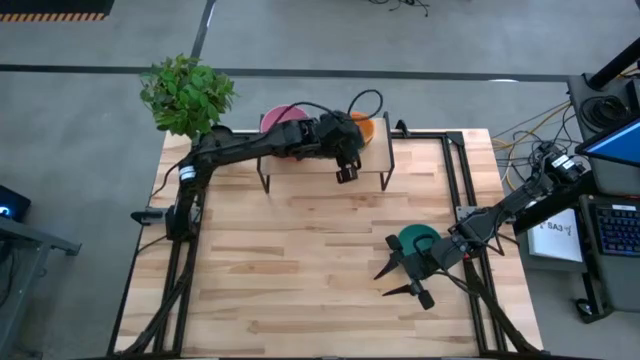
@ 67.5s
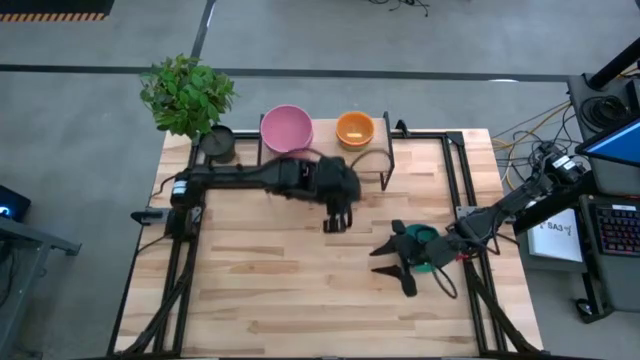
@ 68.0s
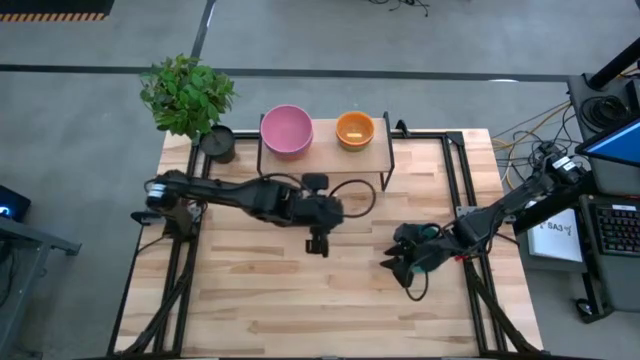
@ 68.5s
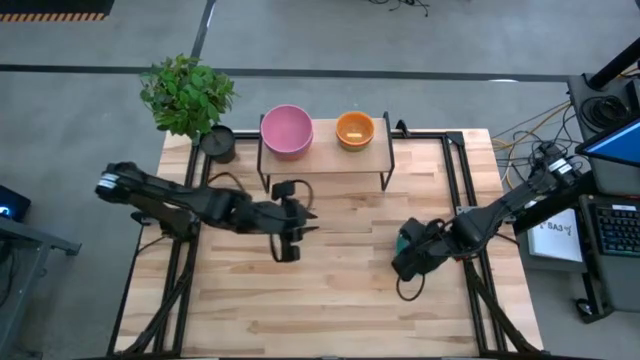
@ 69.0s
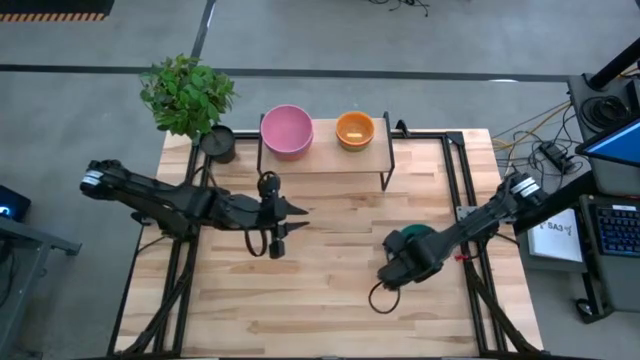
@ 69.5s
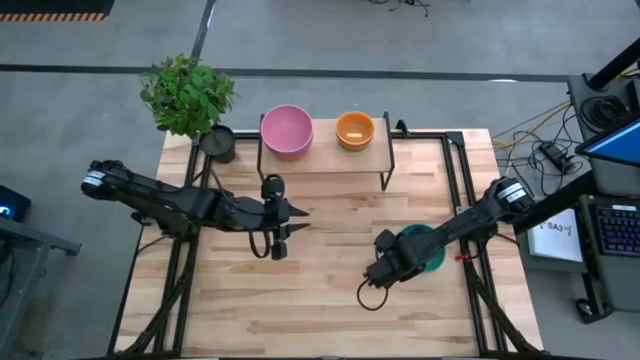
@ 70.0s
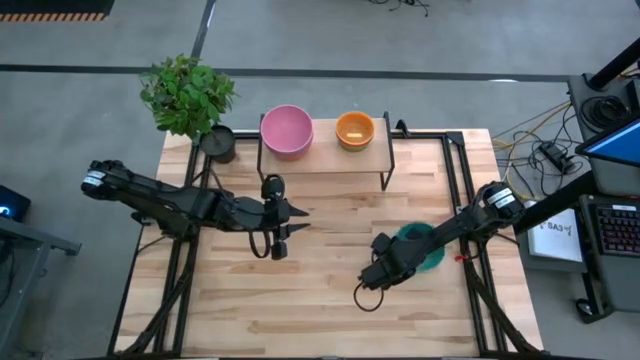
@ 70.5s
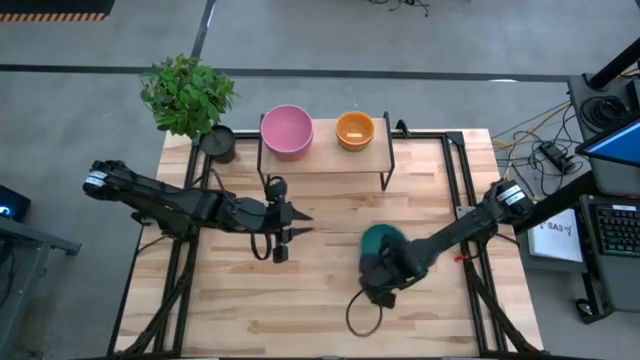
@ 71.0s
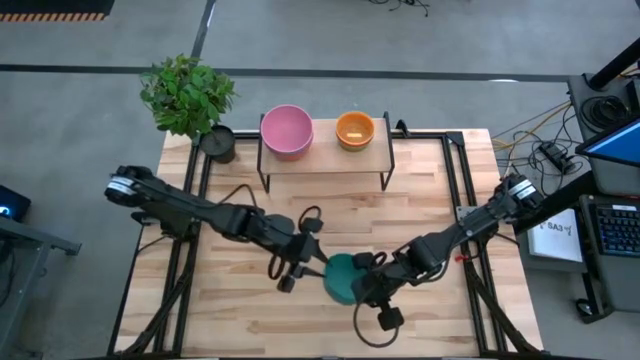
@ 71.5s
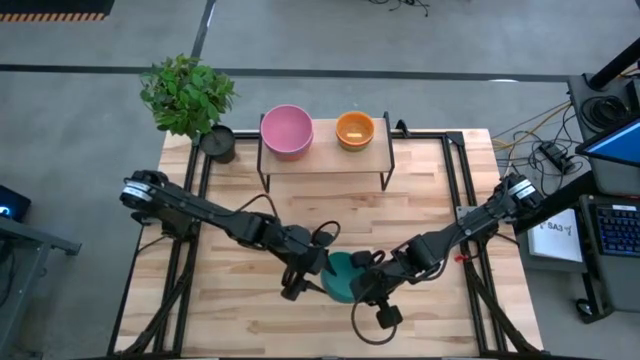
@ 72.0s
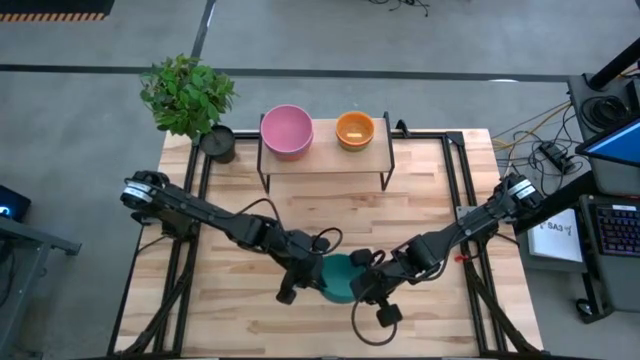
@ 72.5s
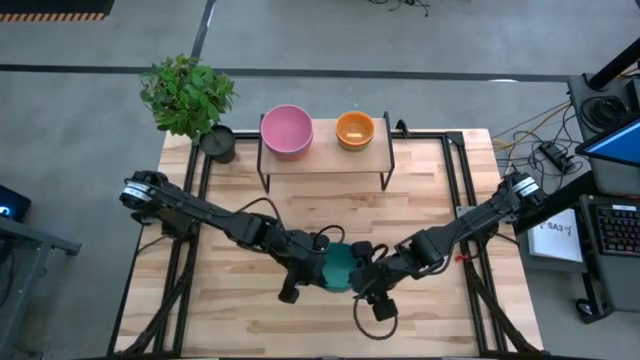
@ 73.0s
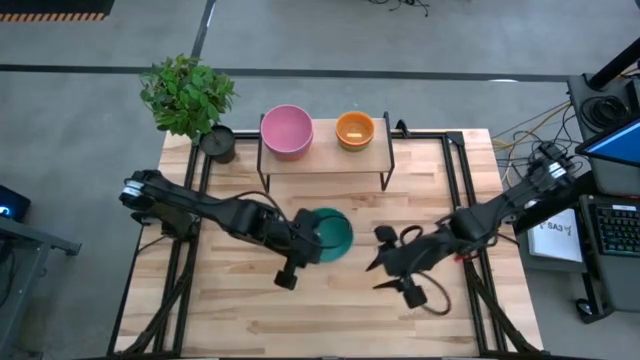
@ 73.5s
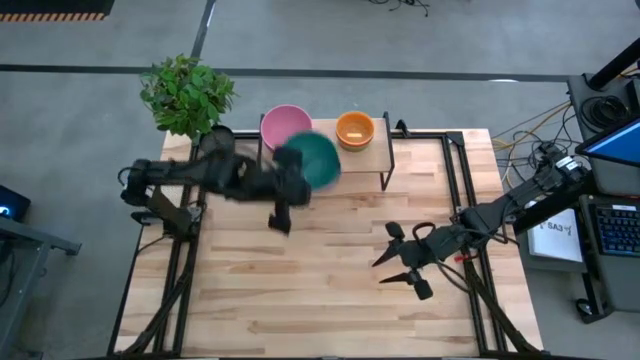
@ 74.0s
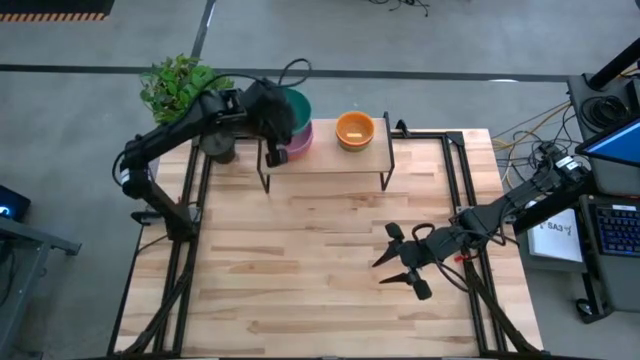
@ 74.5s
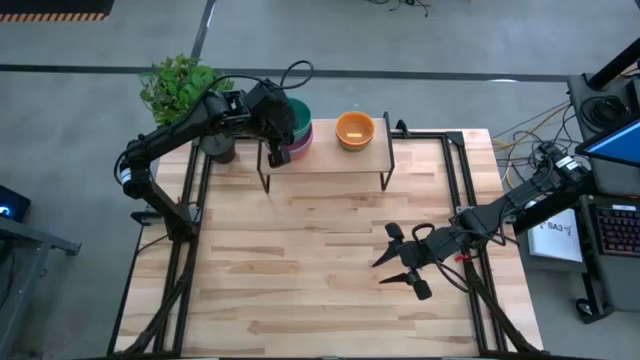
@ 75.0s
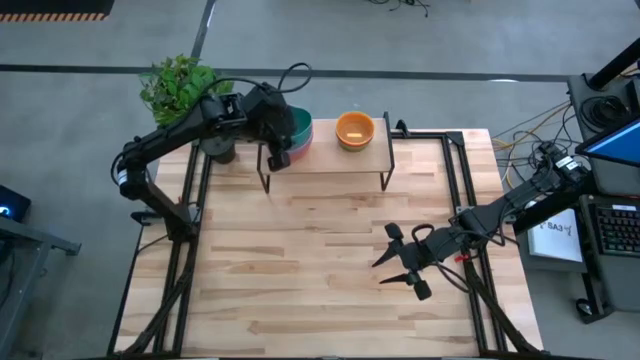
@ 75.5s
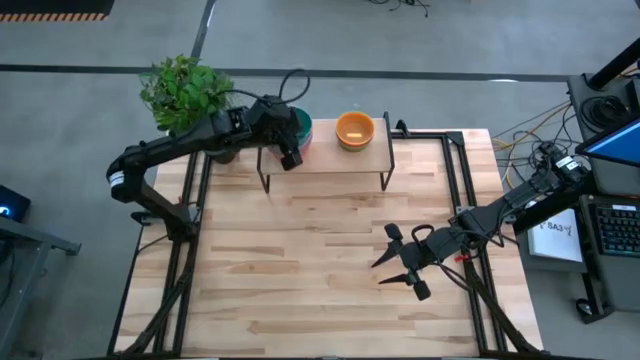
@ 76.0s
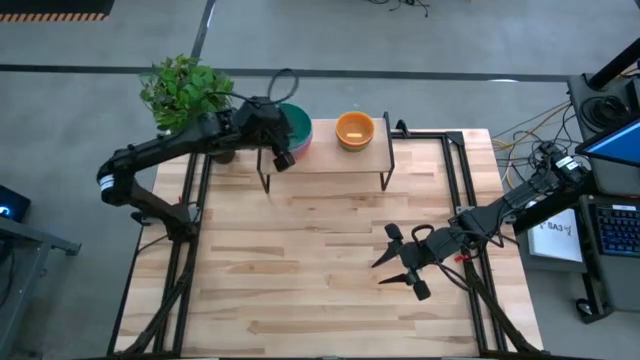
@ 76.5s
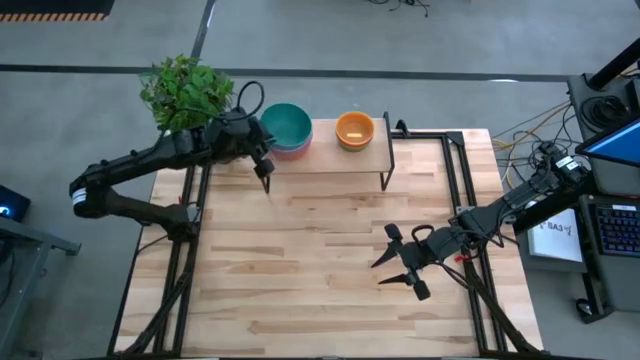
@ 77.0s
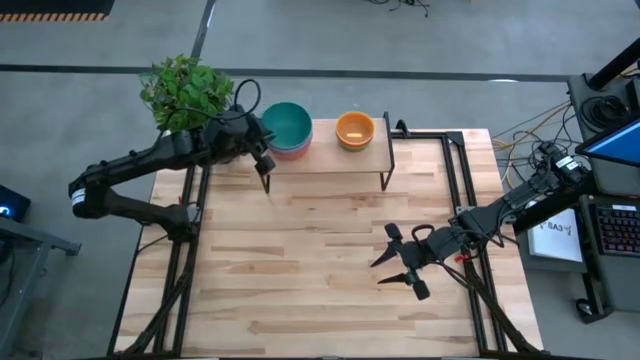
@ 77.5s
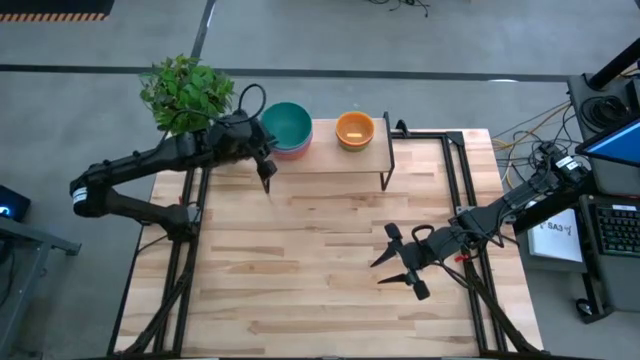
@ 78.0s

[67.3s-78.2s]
Task: Place and stack bowls onto a shelf
Stack the large green bowl on top of the large pink bowl on the shelf

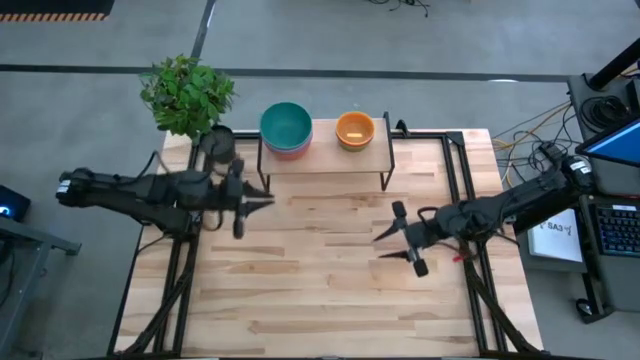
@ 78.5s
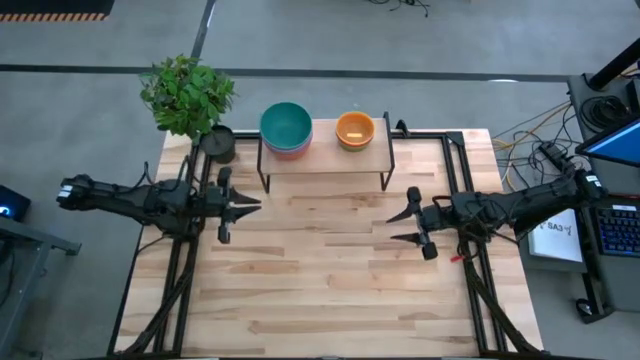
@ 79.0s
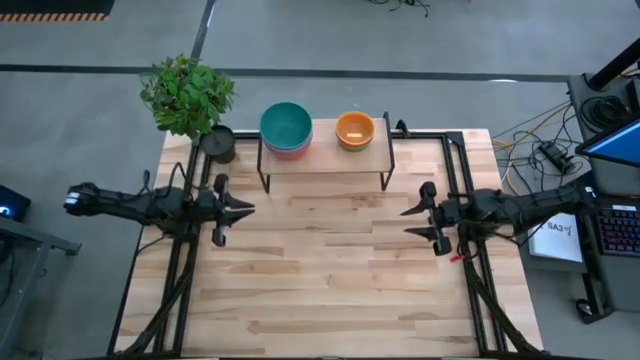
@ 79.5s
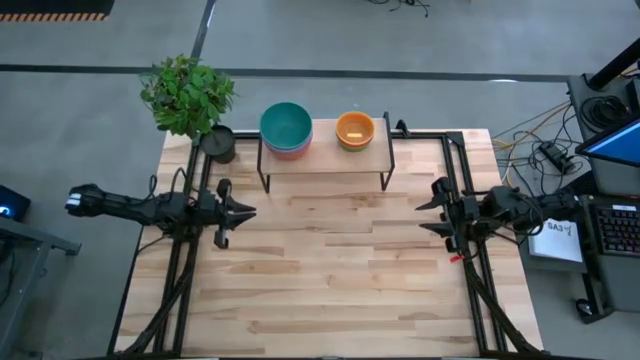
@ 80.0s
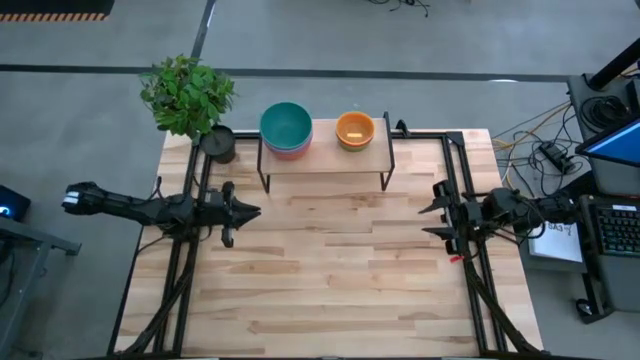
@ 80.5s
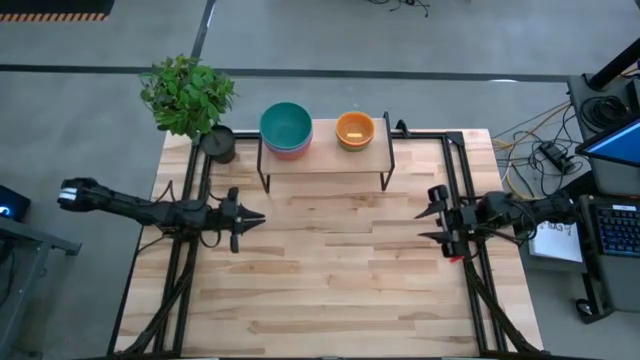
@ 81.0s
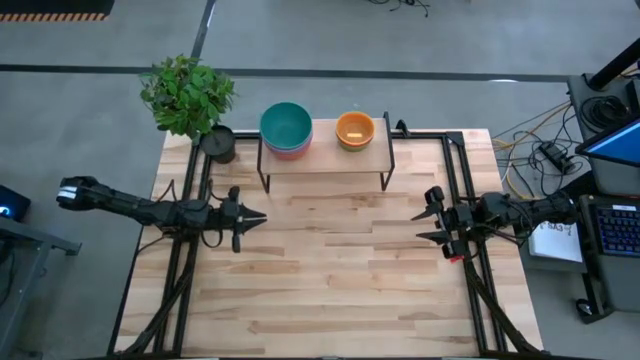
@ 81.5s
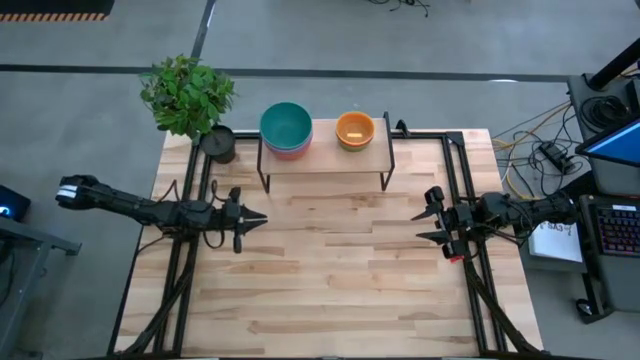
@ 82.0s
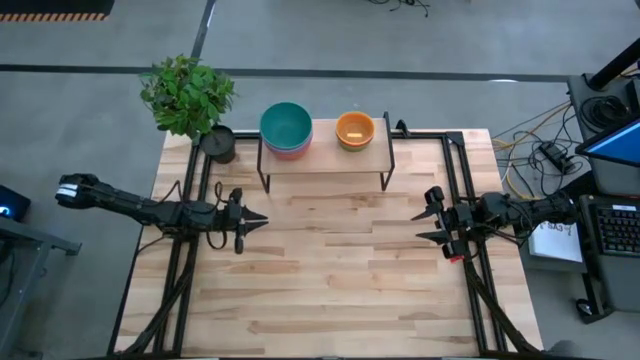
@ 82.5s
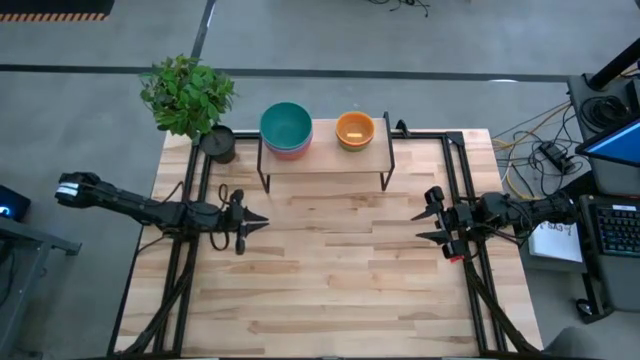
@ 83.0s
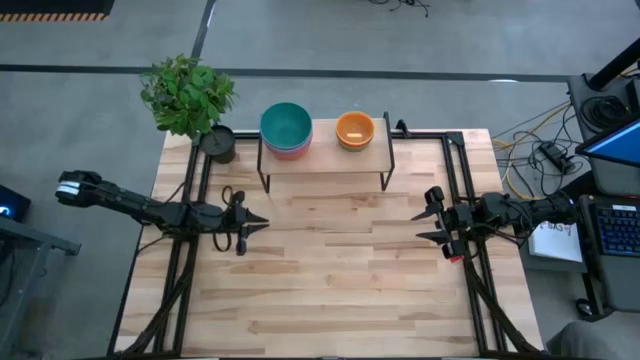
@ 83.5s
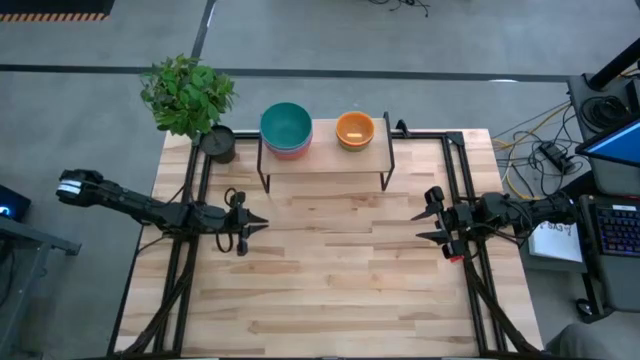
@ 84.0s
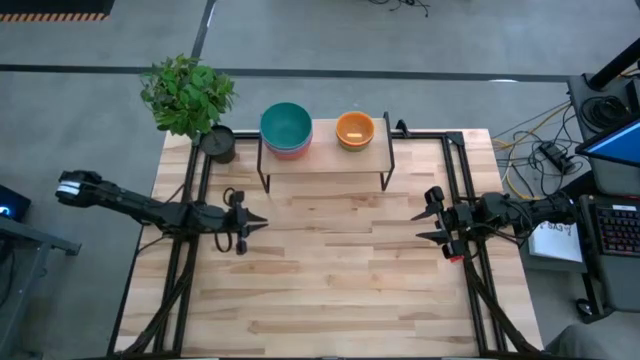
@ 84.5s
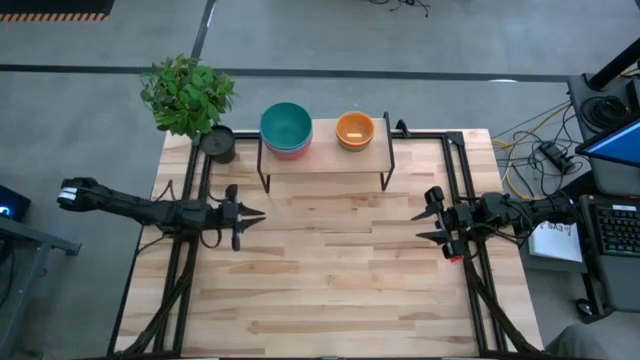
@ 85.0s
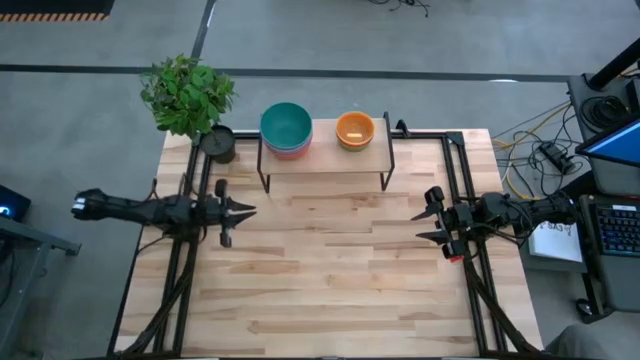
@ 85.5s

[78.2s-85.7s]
Return to Home Position

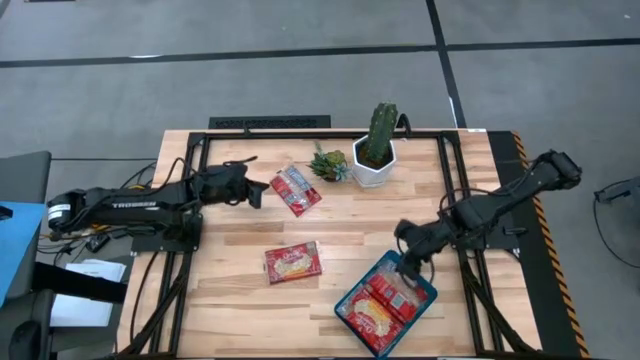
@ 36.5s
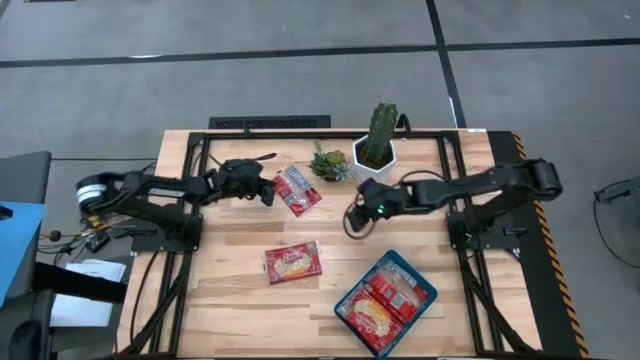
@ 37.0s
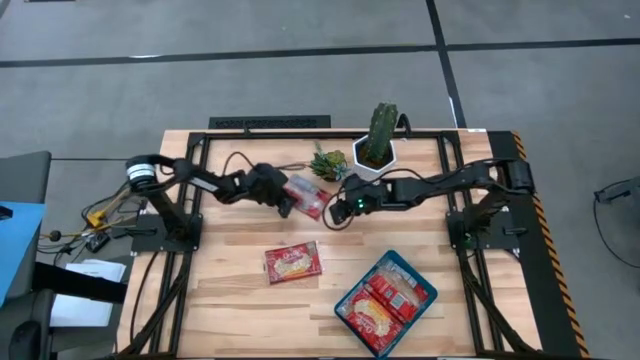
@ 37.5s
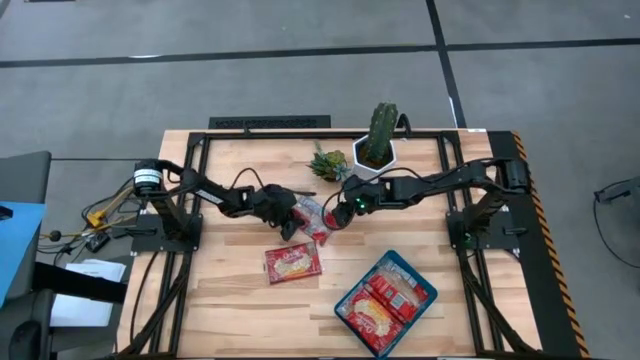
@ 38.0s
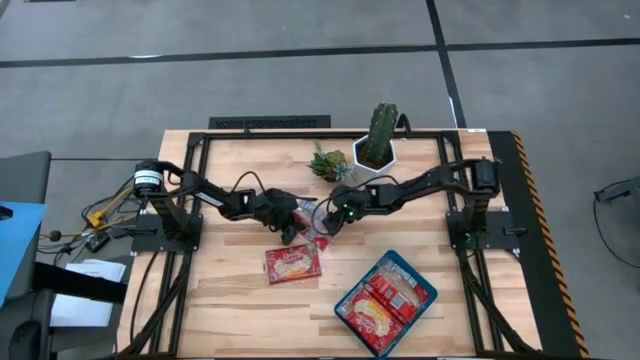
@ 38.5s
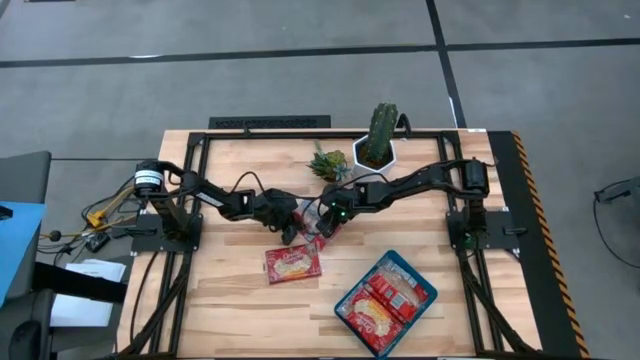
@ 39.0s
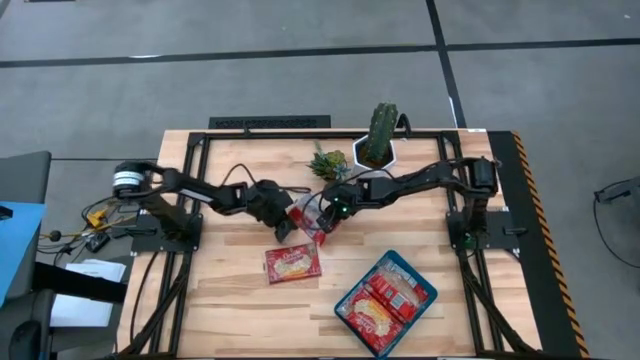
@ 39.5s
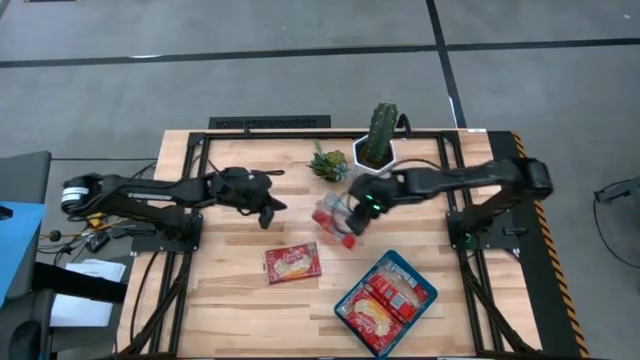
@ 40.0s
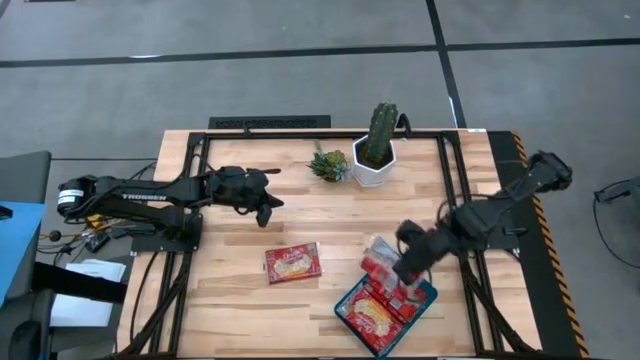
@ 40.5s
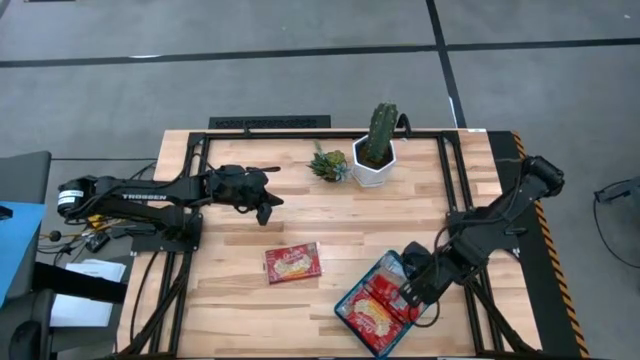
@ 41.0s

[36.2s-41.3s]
Task: Sort popcorn bags into baskets
Put the popcorn bag into the bin
